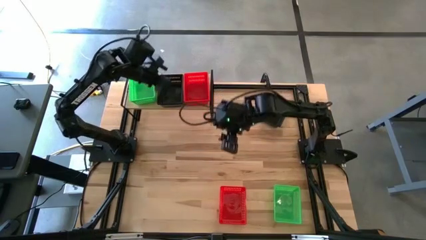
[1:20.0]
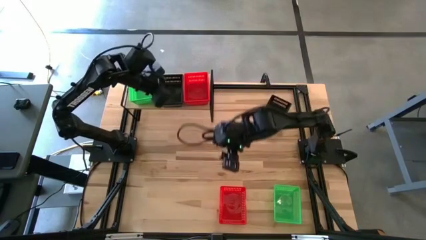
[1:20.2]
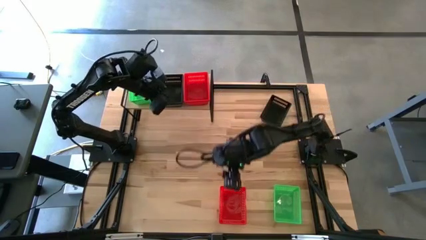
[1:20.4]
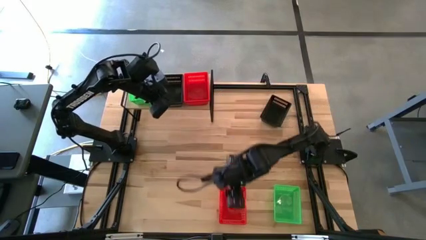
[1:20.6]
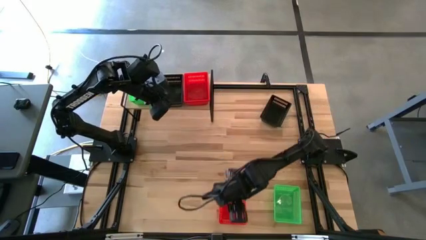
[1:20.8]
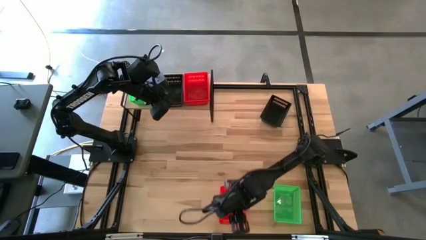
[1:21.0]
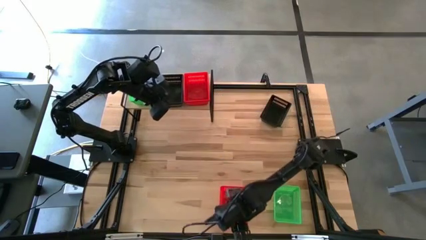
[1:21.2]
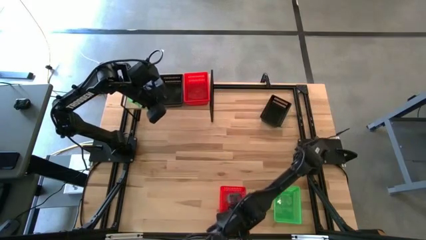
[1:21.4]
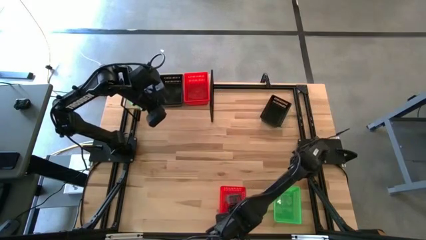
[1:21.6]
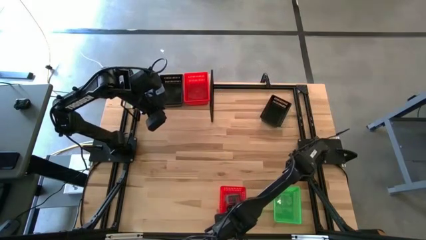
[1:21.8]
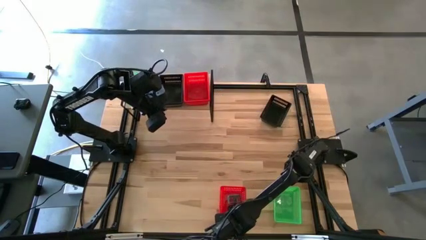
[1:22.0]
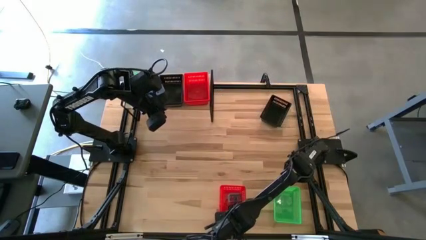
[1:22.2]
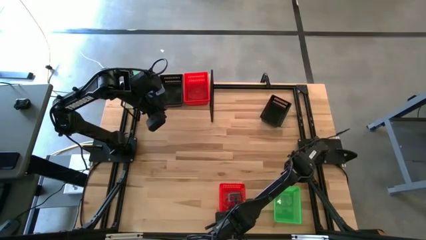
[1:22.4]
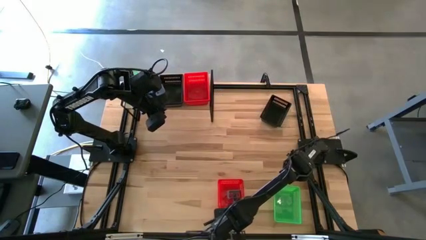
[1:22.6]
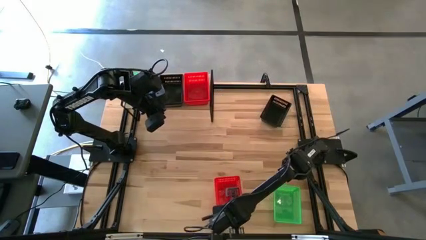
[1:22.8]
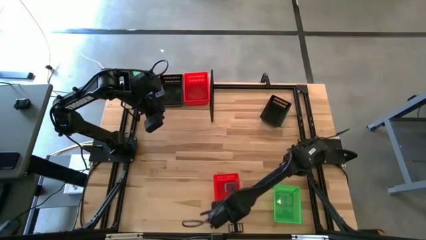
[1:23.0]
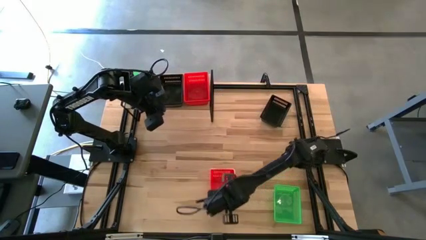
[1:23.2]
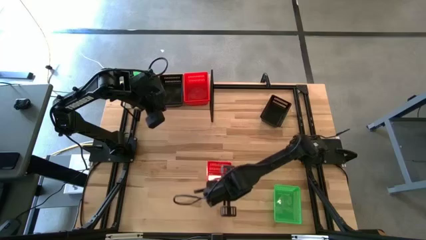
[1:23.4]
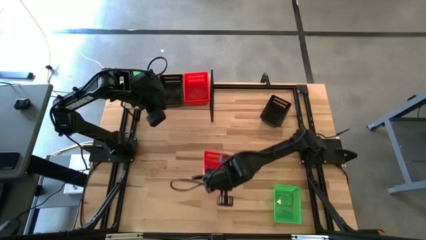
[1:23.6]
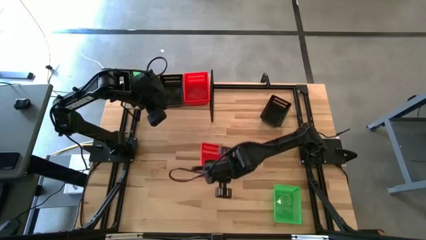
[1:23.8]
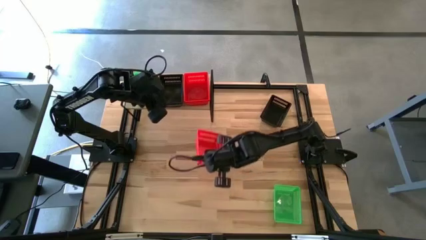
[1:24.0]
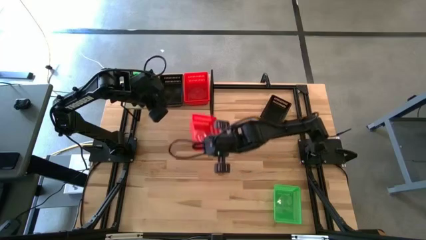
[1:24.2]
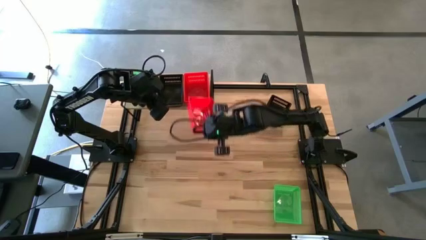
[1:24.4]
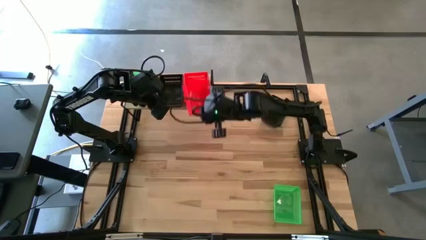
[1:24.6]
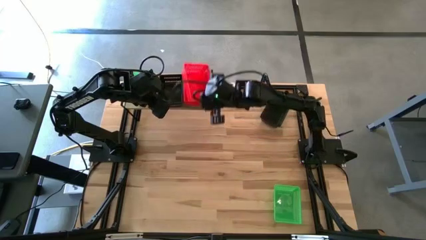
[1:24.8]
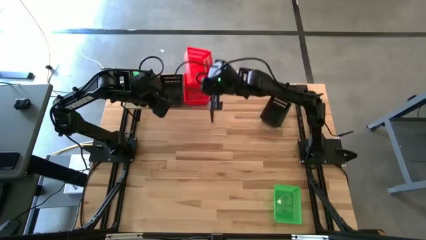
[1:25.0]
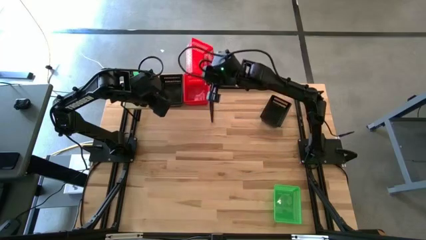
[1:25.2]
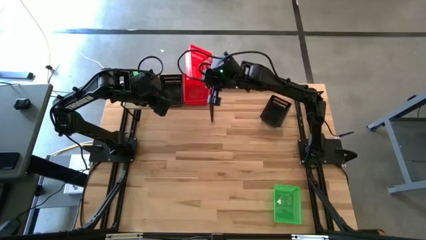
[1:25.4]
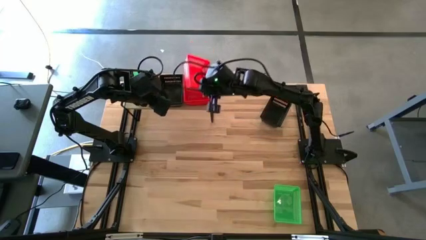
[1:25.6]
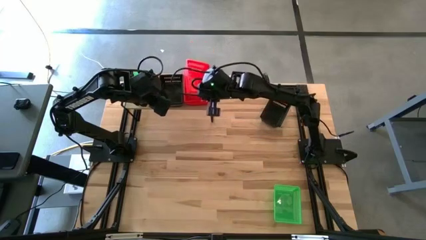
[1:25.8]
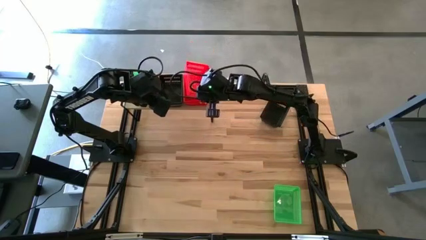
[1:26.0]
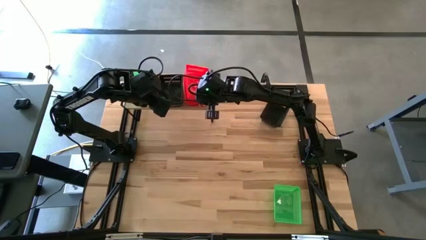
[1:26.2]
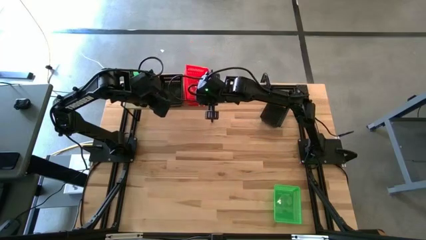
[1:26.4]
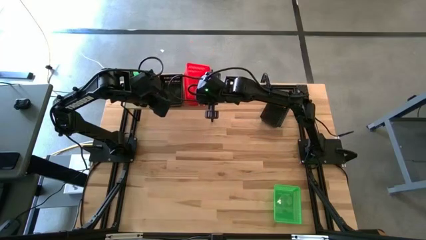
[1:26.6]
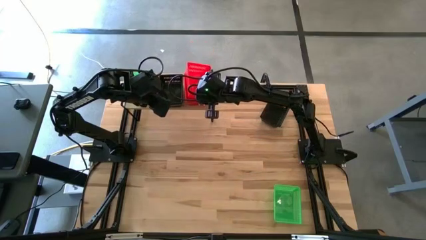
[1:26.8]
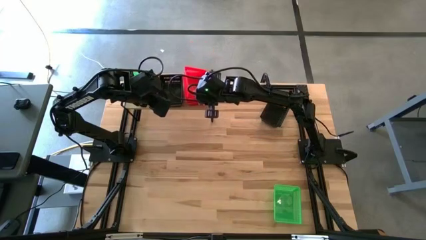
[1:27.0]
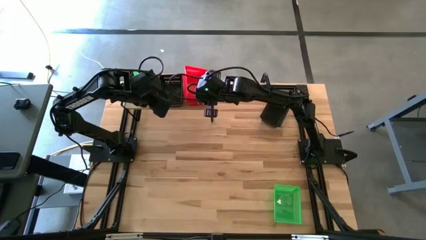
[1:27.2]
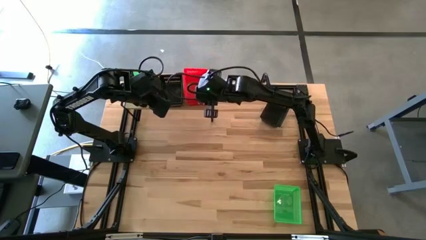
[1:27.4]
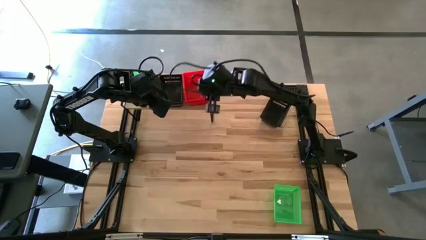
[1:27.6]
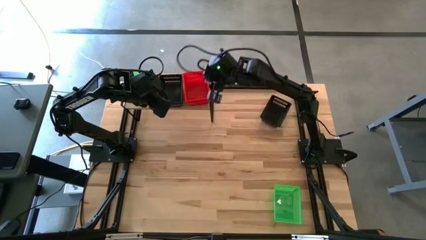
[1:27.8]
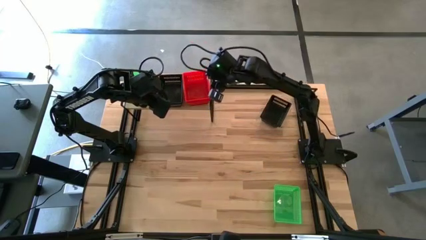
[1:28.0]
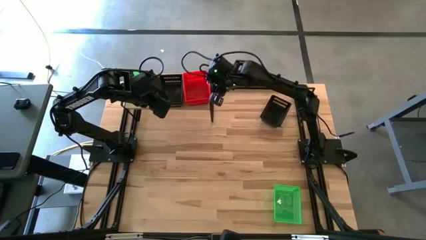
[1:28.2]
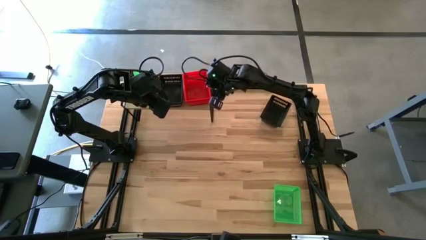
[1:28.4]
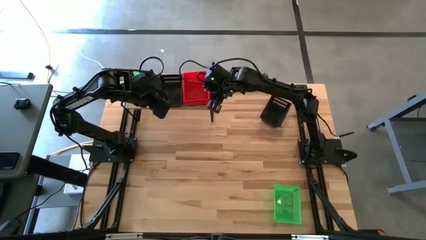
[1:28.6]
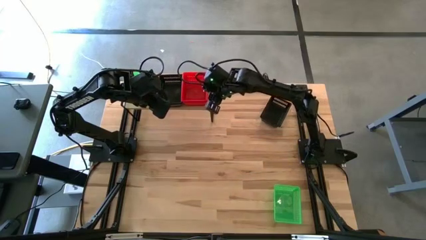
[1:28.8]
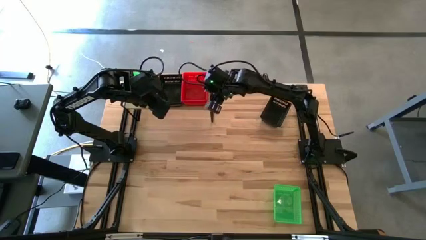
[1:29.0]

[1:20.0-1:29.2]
Task: Stack baskets on shelf by color
Stack the red bin on top of the red bin on the shelf

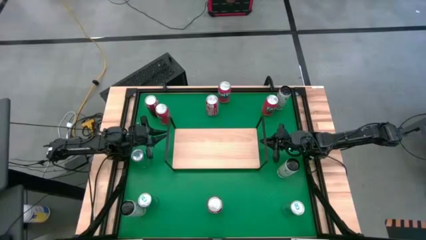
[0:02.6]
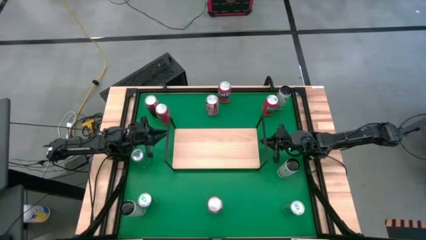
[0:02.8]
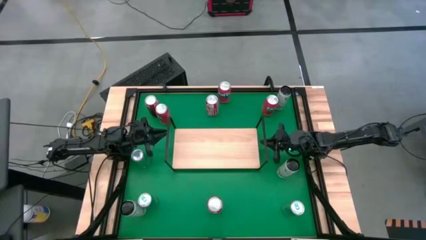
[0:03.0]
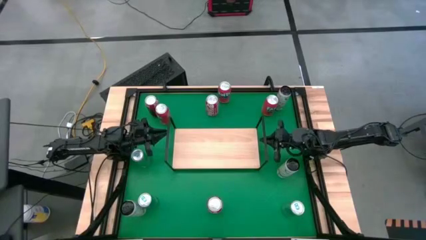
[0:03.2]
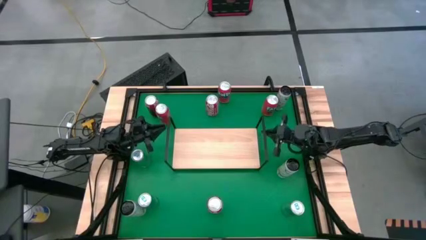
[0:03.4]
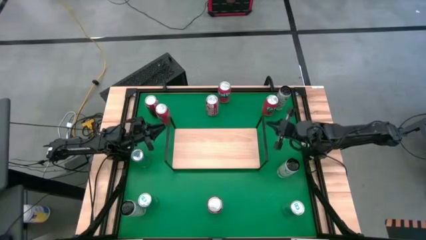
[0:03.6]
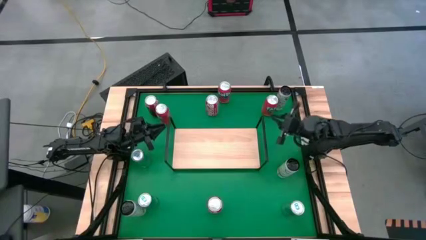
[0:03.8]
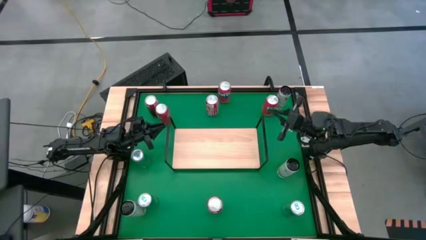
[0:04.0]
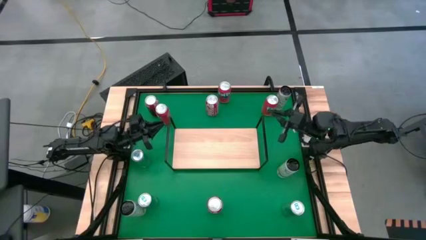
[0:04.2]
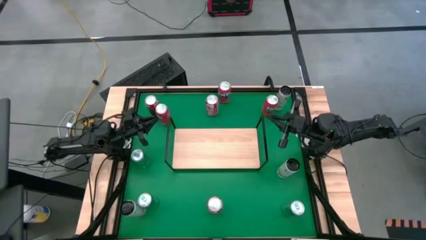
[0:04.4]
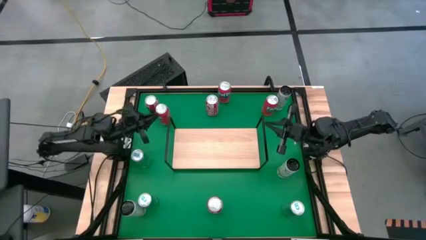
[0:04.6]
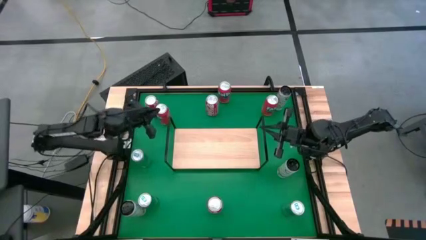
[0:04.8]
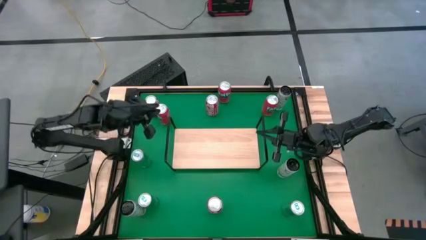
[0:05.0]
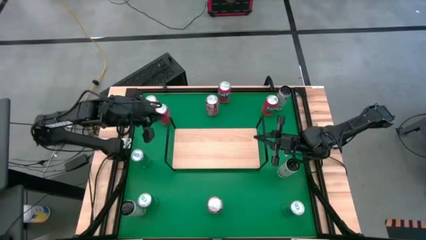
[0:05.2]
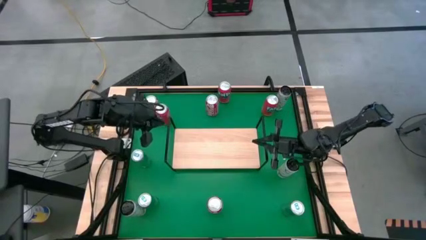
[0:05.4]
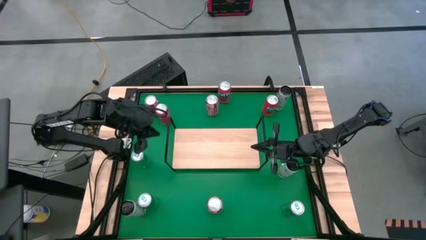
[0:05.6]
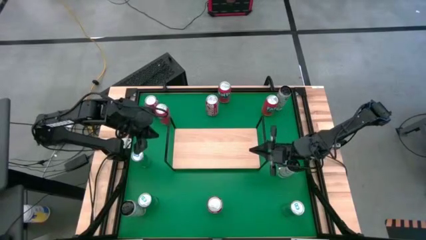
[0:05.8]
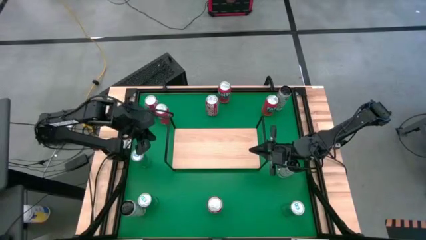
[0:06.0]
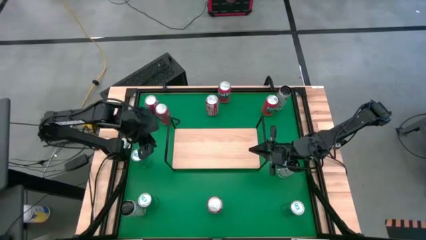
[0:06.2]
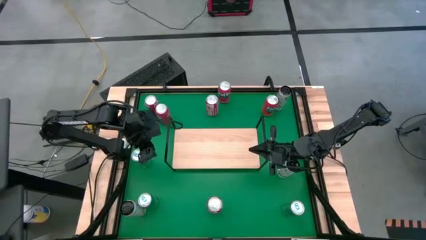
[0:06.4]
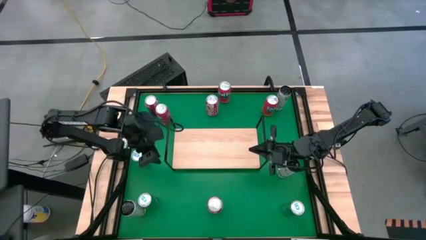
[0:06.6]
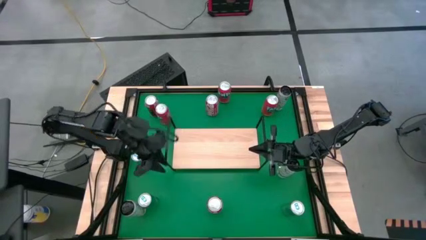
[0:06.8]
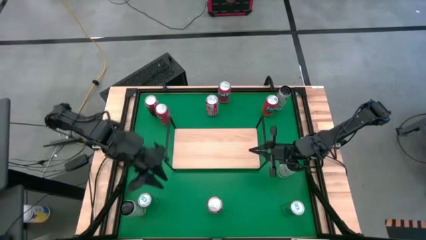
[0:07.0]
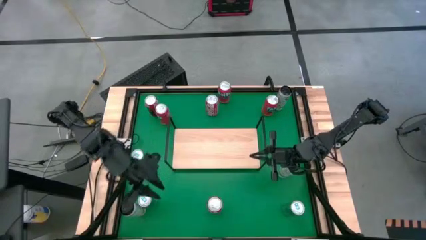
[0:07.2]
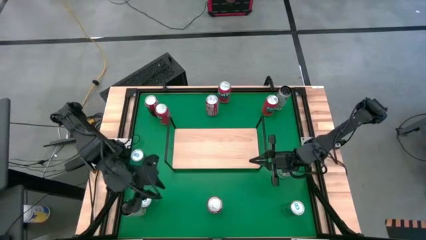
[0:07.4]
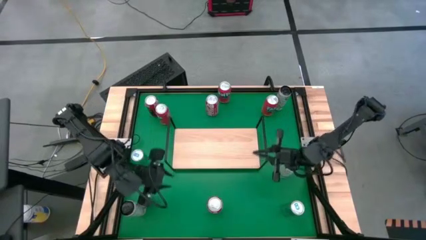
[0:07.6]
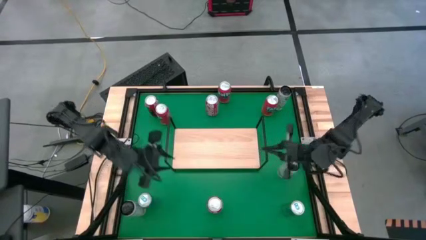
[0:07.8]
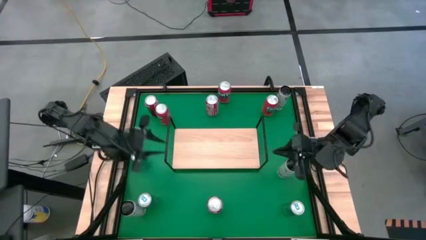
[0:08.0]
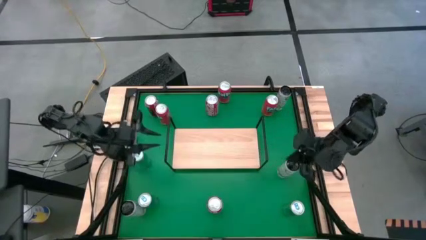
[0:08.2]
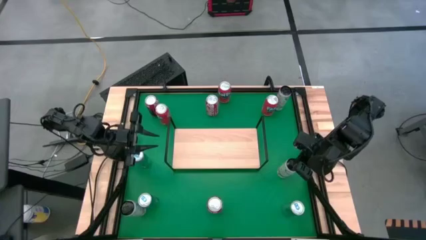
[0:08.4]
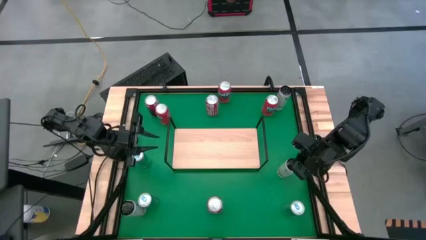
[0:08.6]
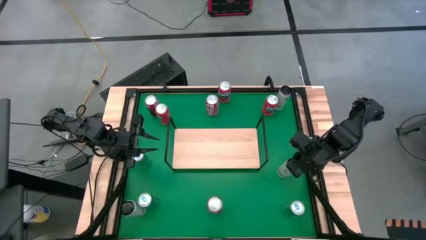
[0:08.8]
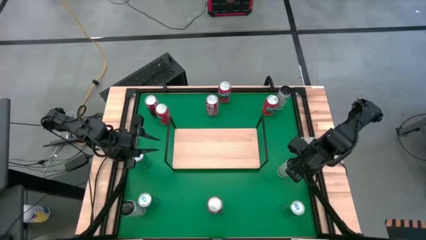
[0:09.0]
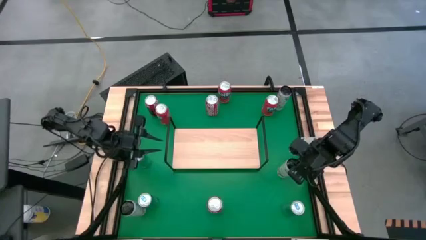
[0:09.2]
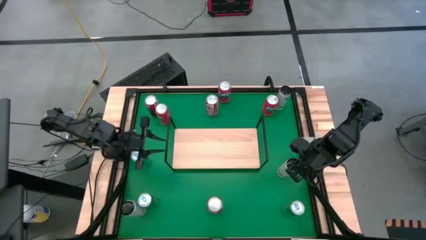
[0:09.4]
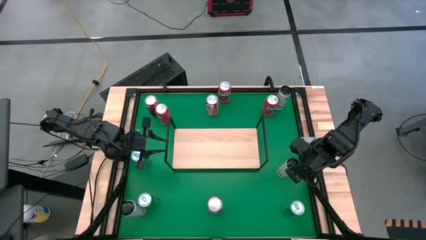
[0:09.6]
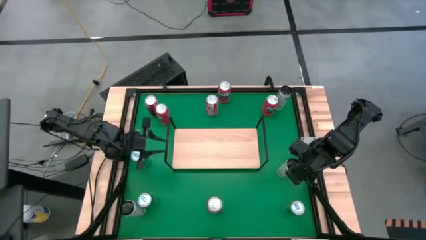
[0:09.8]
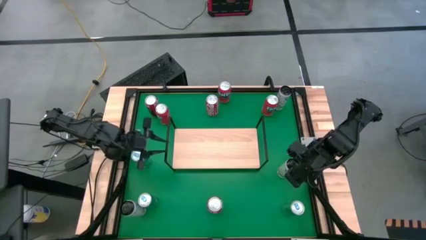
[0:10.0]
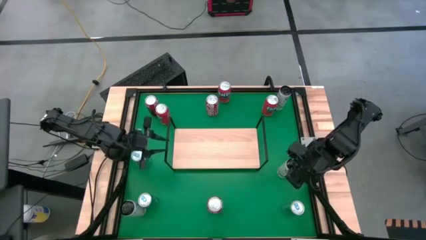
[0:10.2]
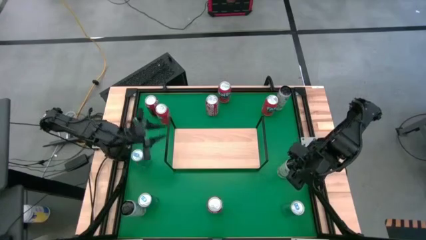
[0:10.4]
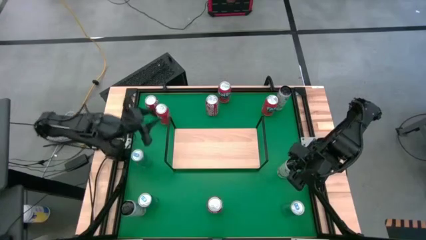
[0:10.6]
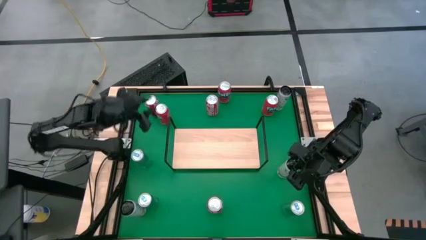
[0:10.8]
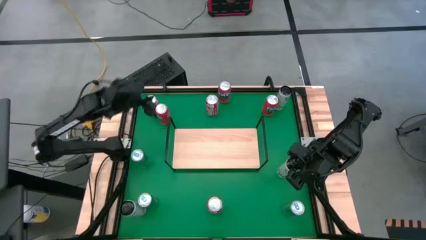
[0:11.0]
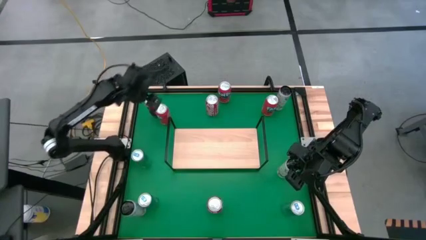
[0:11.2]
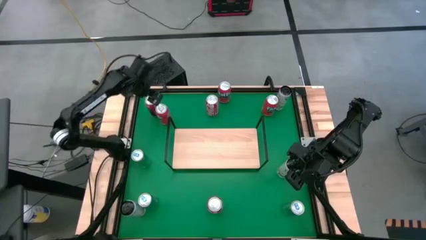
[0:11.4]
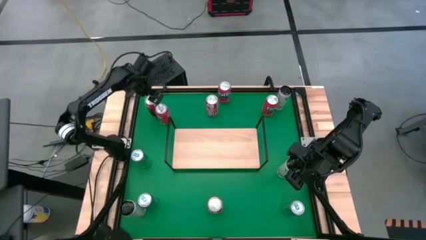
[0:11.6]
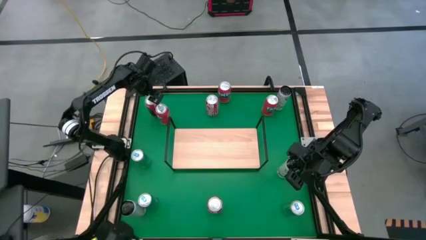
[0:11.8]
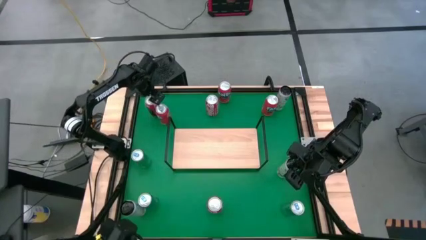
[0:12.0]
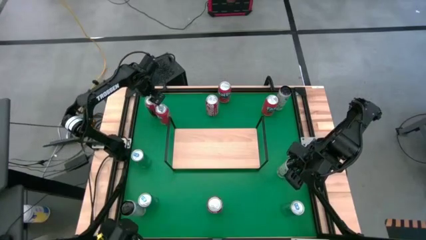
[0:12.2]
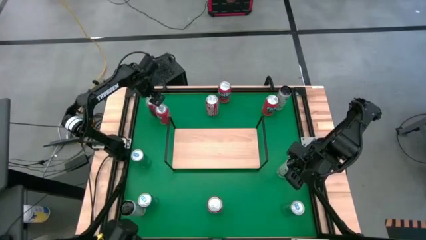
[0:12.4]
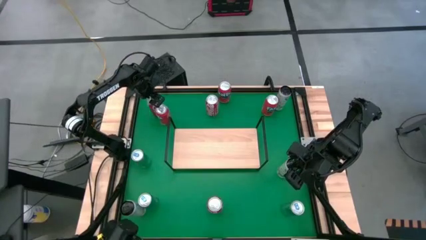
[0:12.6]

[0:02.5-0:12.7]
Task: Place canned beverage on shelf
Put the top left red and white soda can on the shelf
